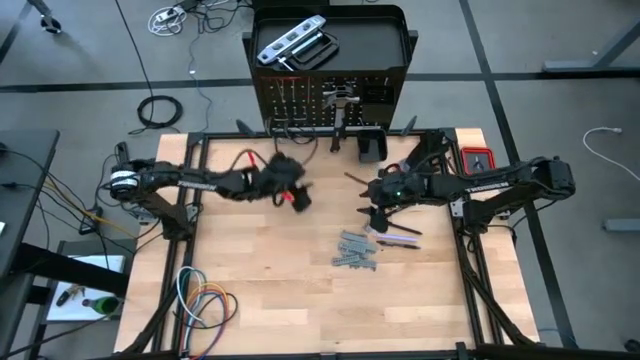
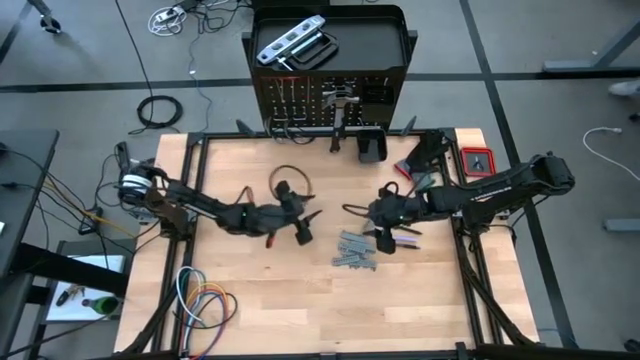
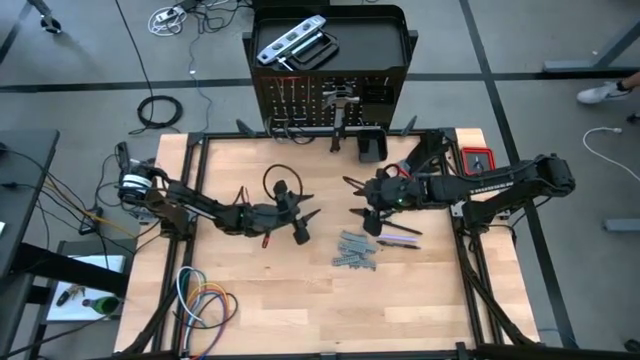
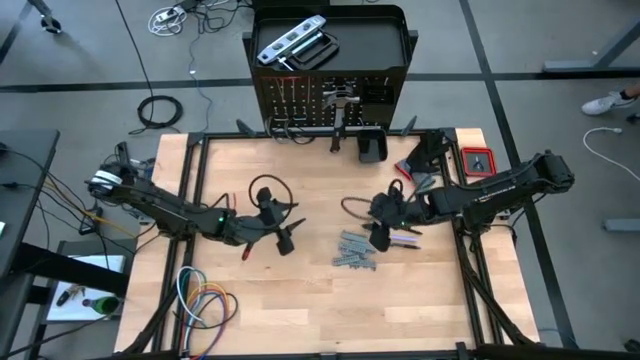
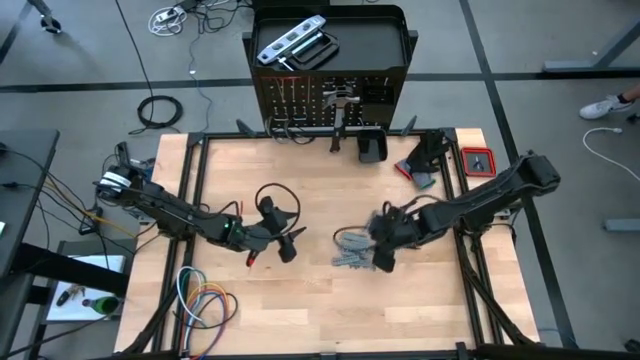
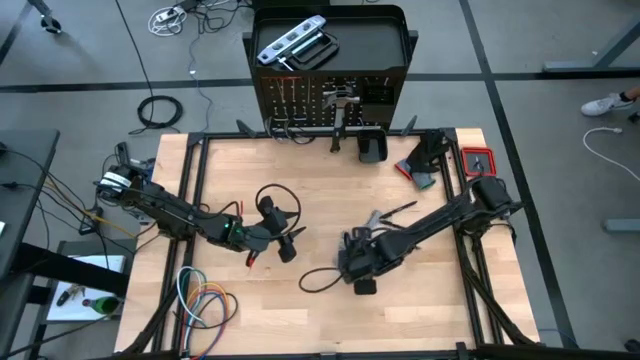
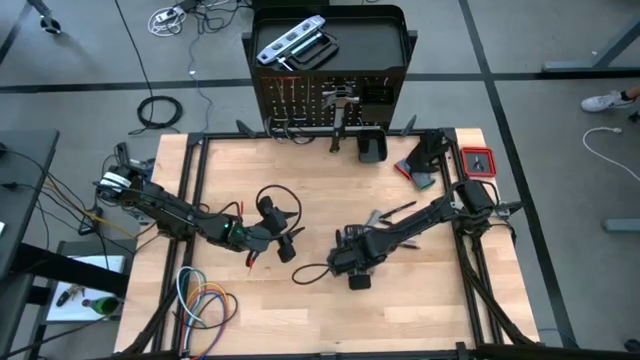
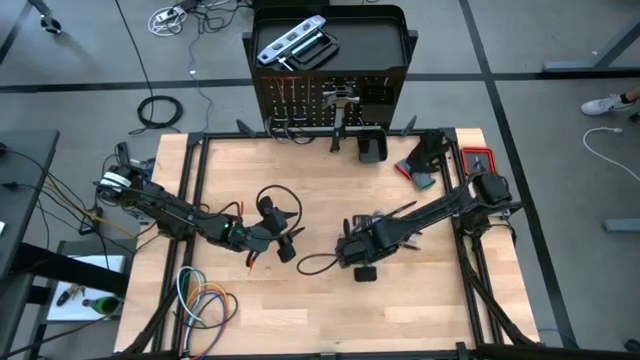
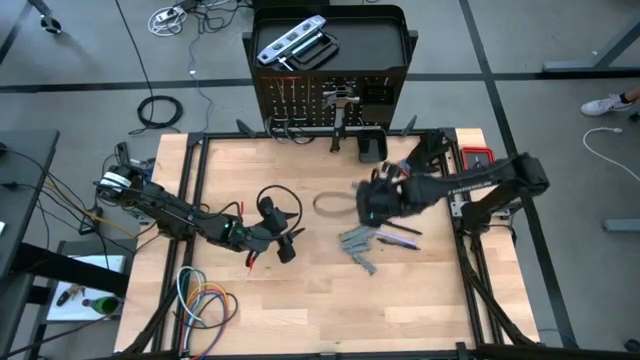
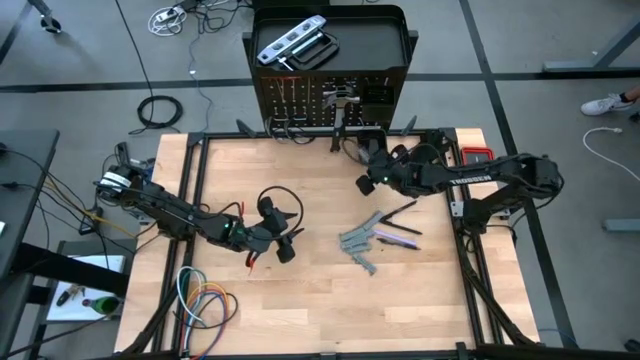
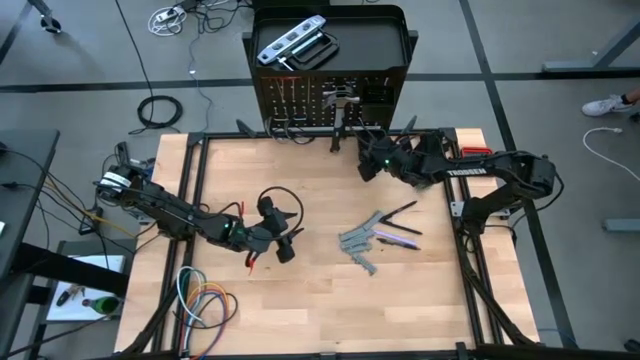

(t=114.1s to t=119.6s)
Task: Hang tools onto peg board
Put the terminal block into the bottom basket of the peg board

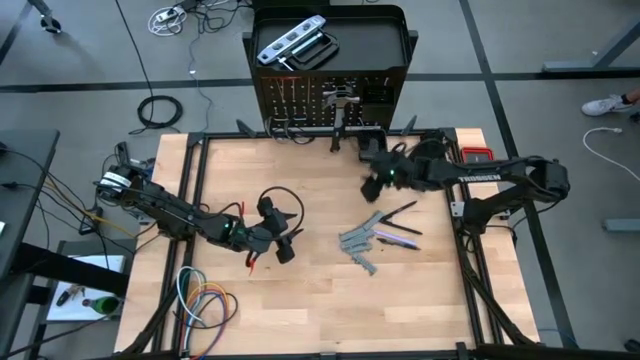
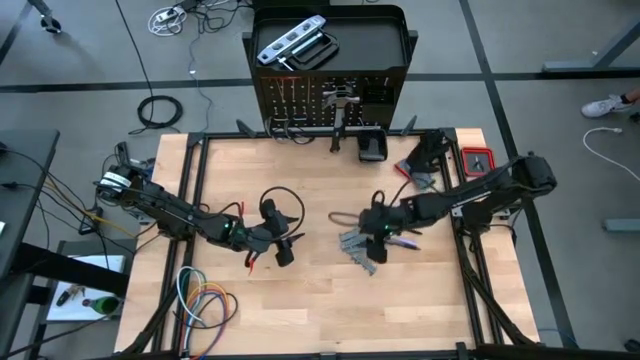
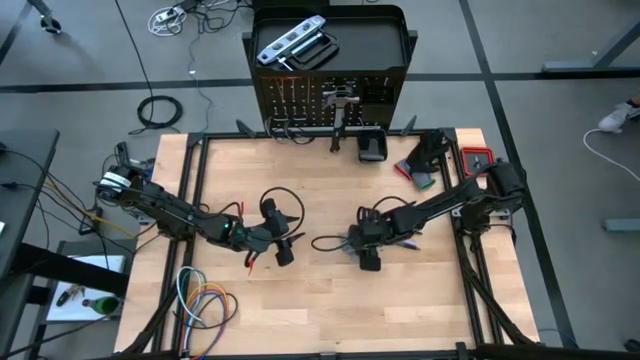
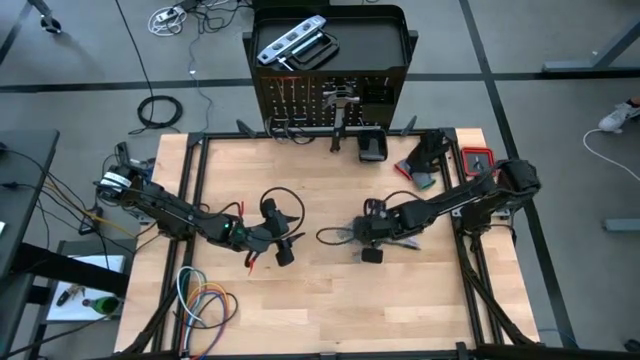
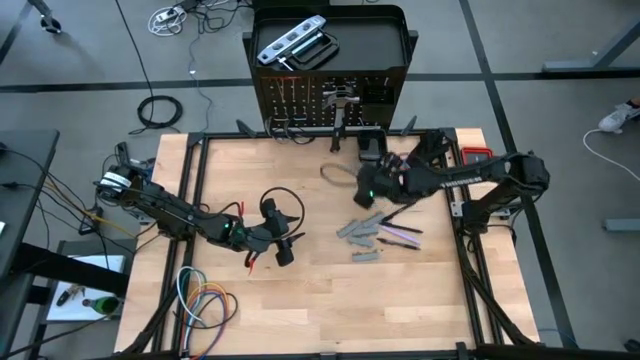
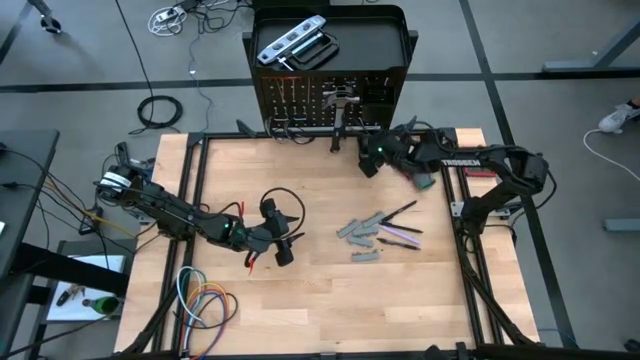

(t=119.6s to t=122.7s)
Put the terminal block into the basket of the peg board

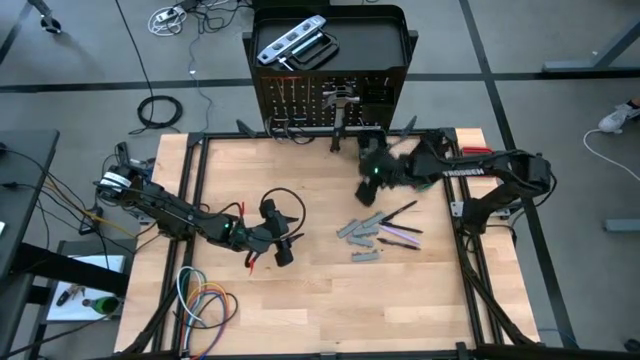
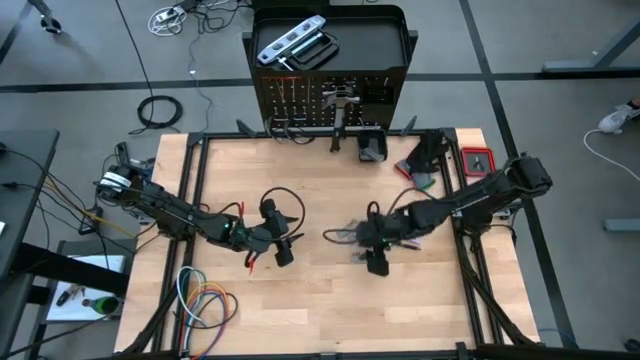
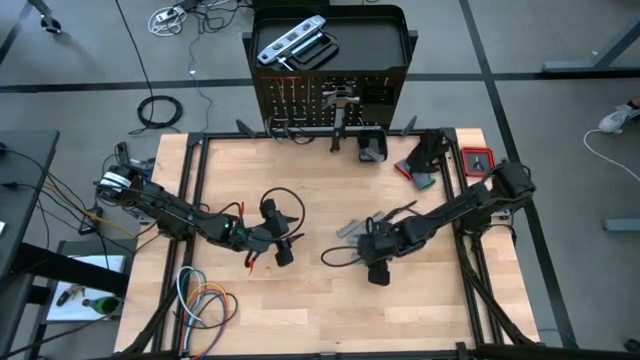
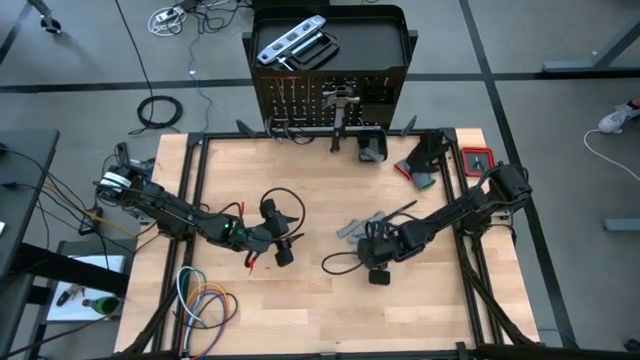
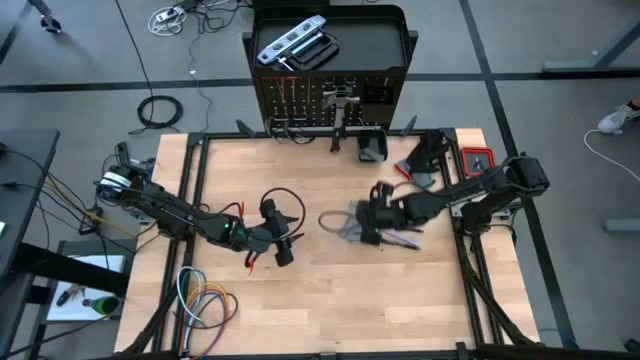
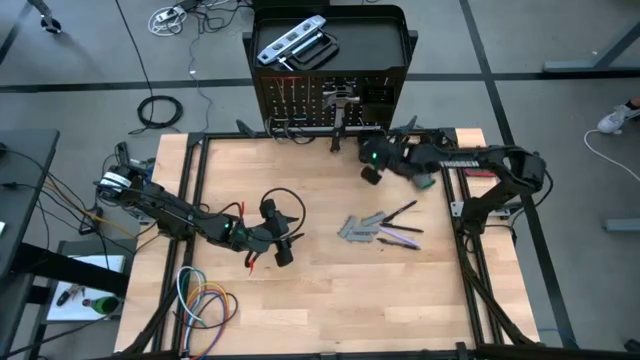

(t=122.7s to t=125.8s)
Put the terminal block into the bottom basket of the peg board

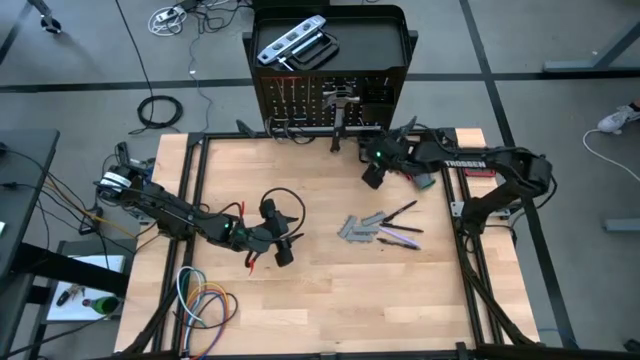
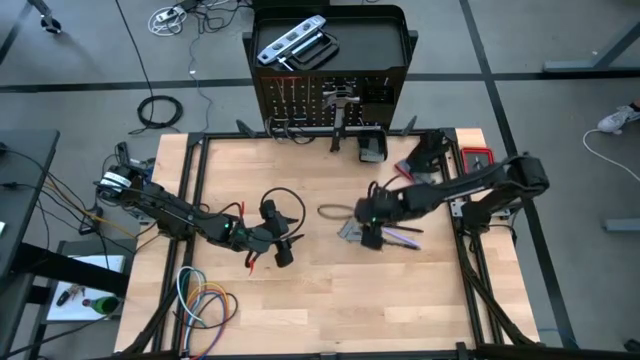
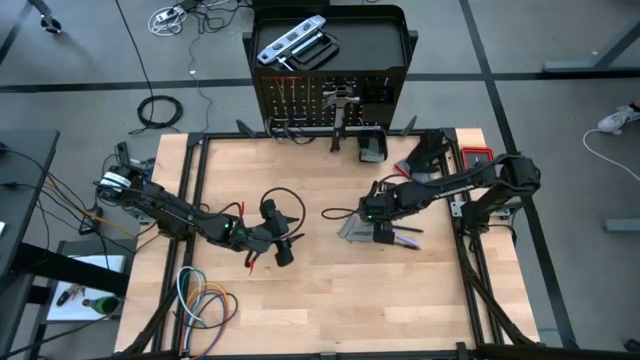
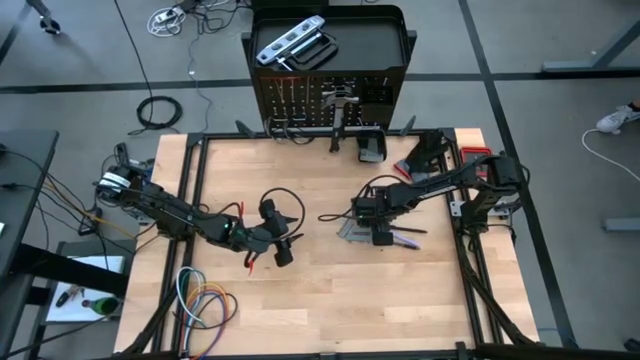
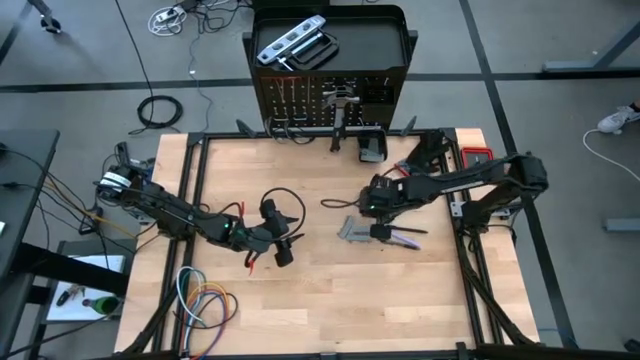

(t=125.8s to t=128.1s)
Put the terminal block into the bottom basket of the peg board

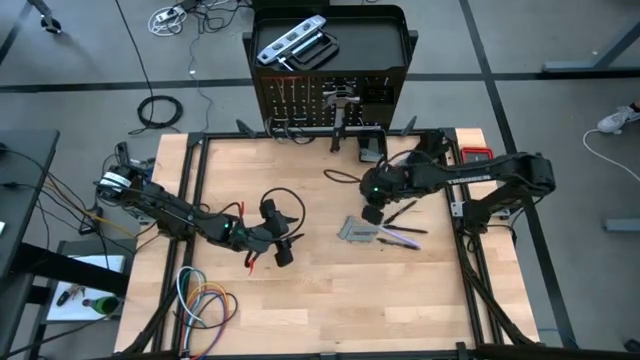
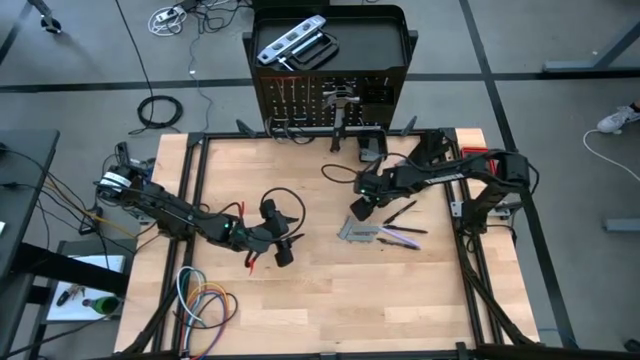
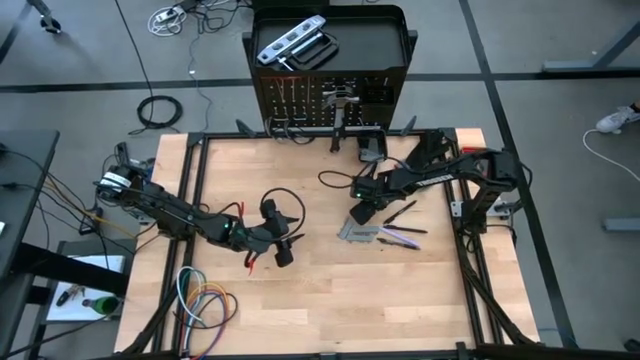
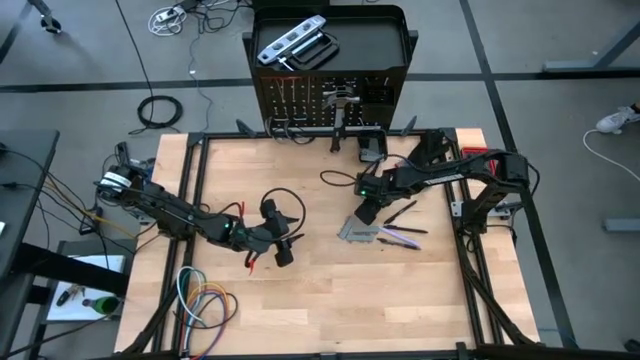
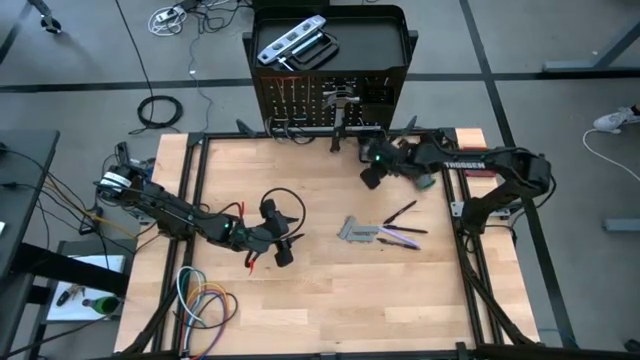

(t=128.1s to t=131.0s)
Put the terminal block into the bottom basket of the peg board

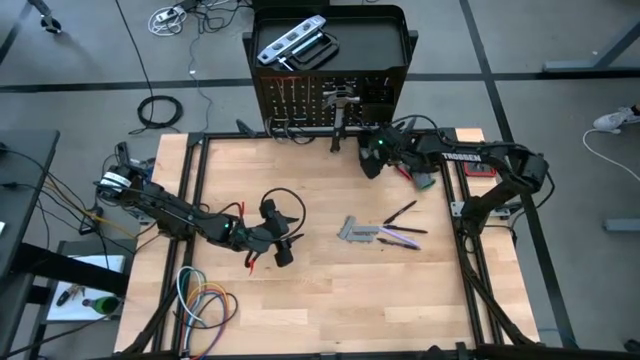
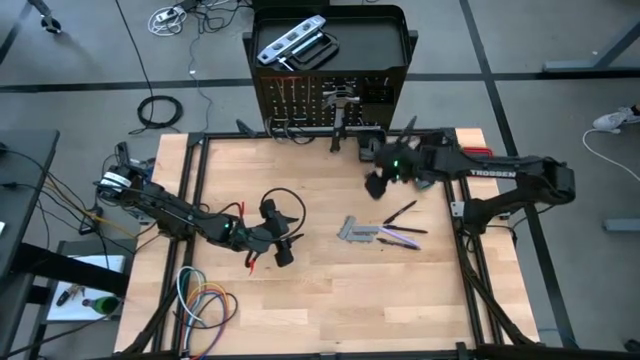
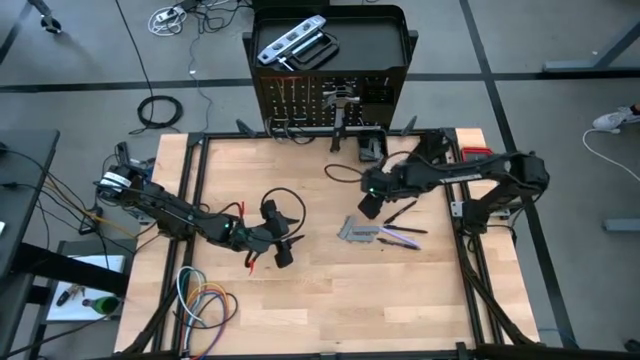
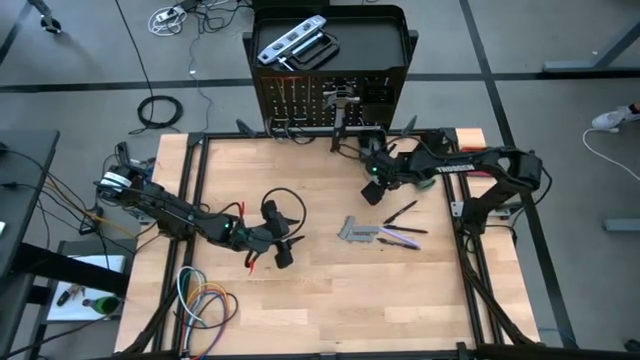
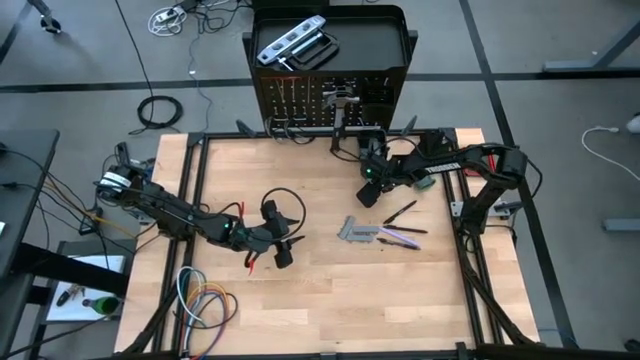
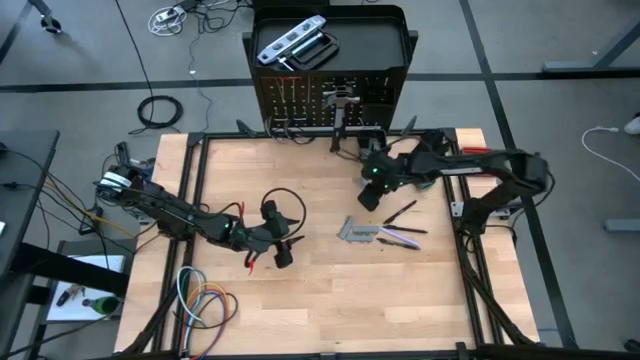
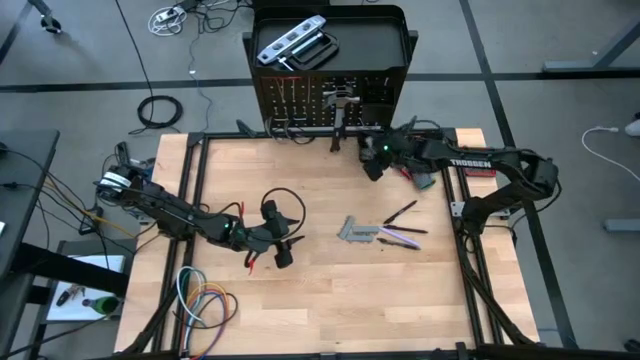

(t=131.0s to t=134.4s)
Put the terminal block into the bottom basket of the peg board

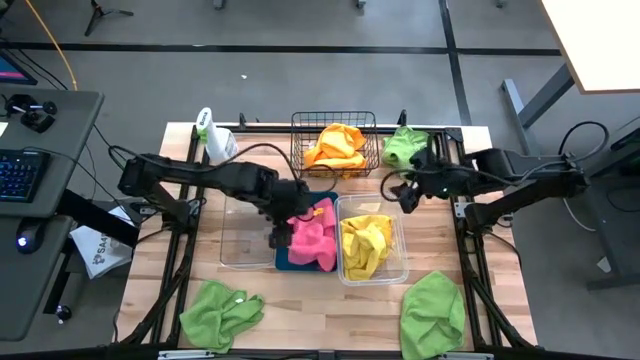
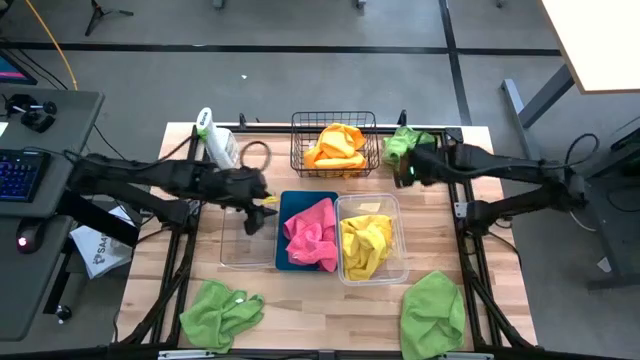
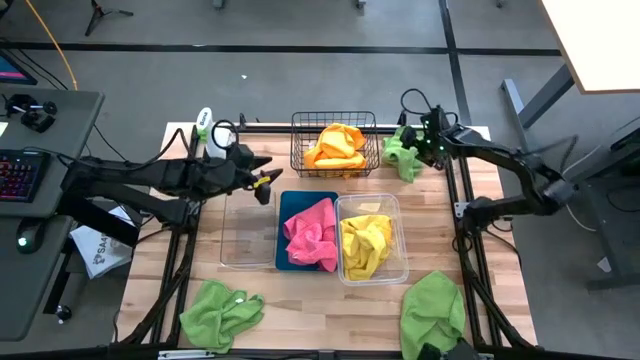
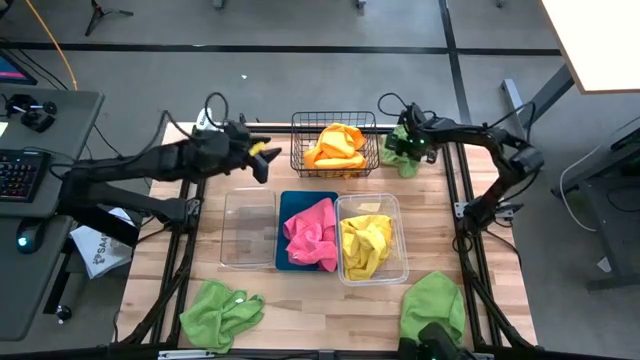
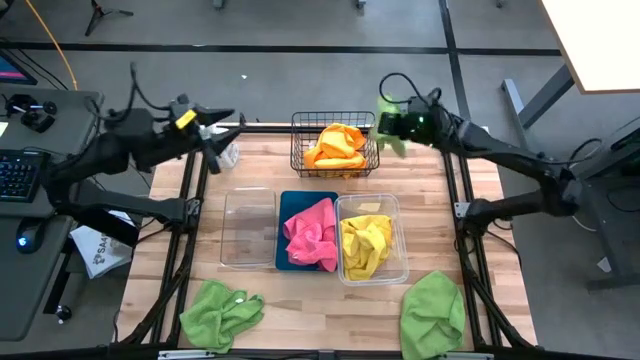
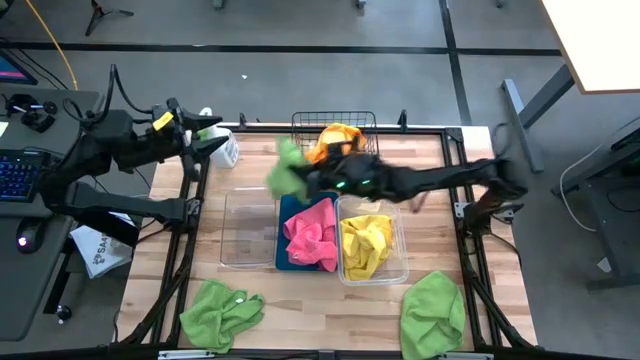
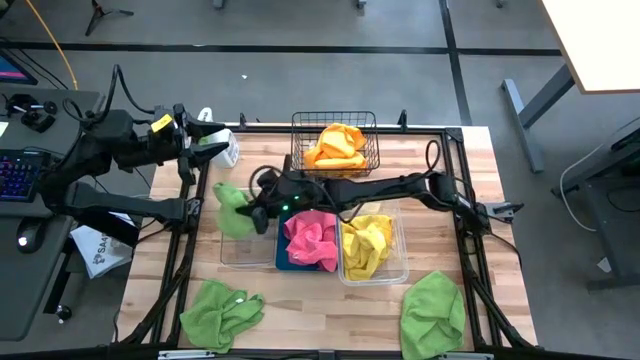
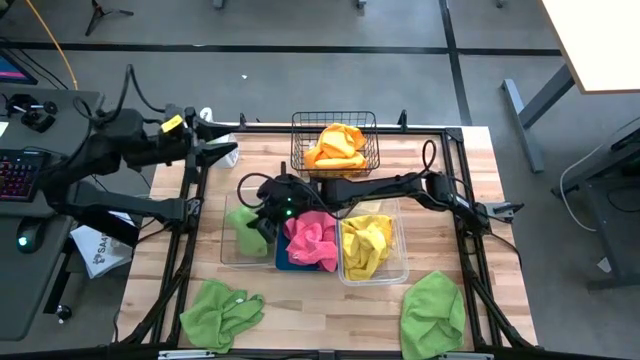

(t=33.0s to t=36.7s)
Task: Sort microfiber towel by color & place in baskets
Put the right green microfiber cloth into the left transparent bin
